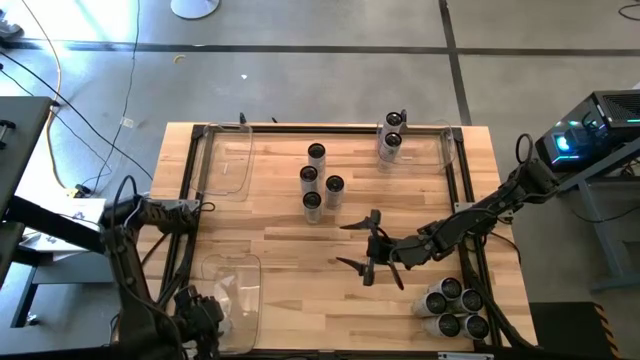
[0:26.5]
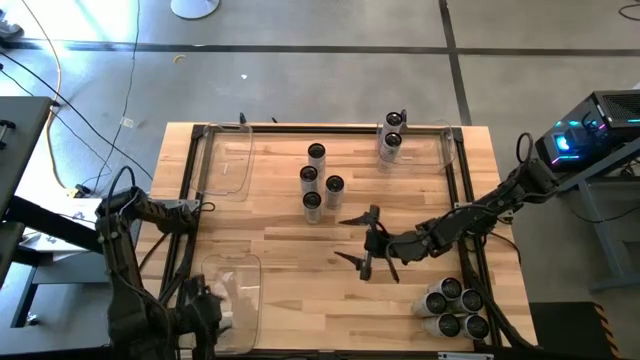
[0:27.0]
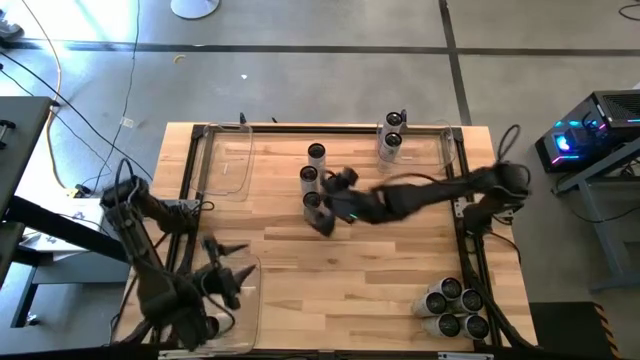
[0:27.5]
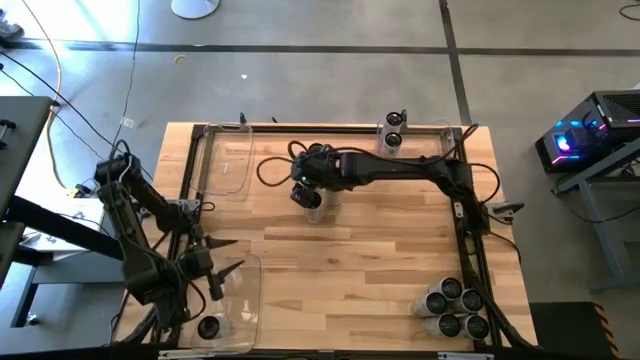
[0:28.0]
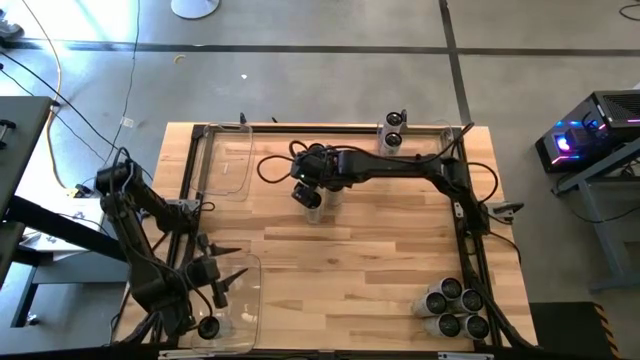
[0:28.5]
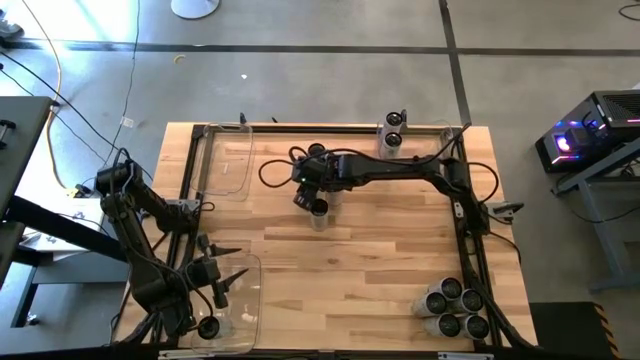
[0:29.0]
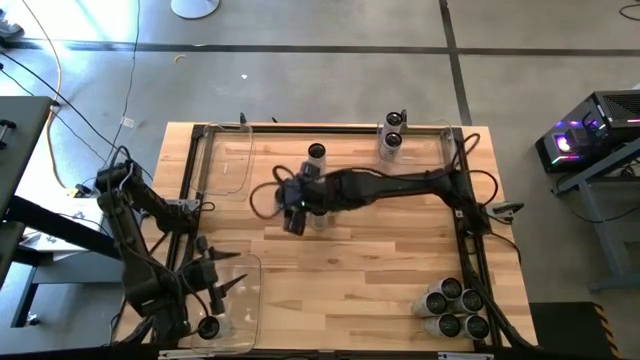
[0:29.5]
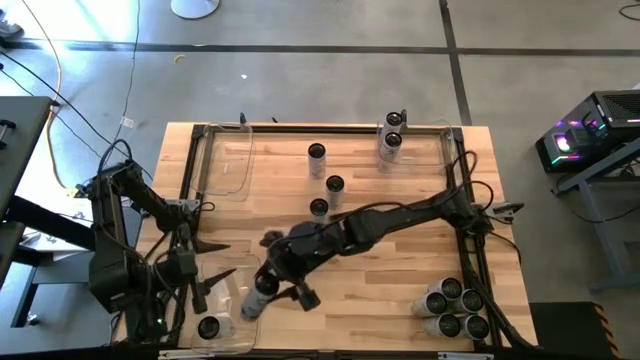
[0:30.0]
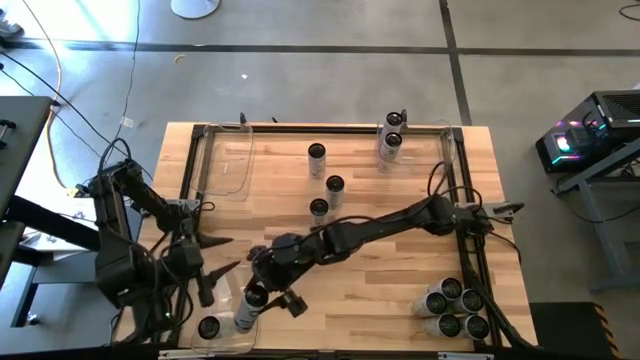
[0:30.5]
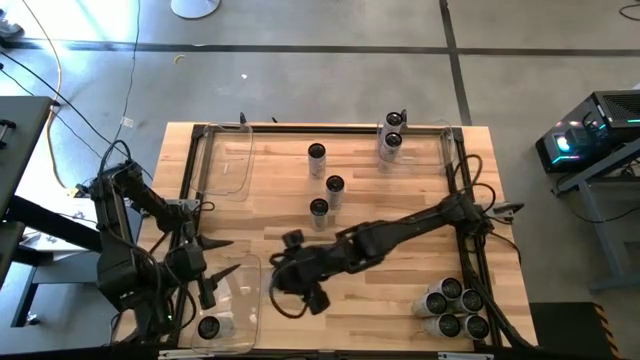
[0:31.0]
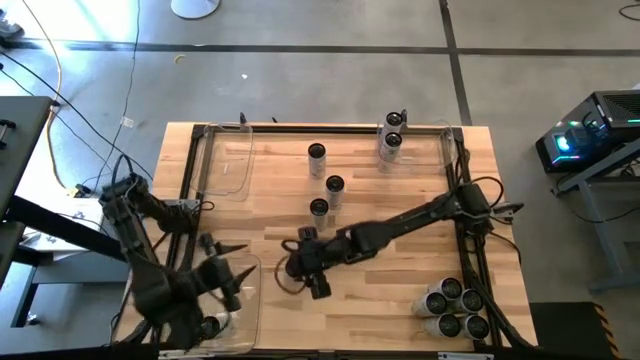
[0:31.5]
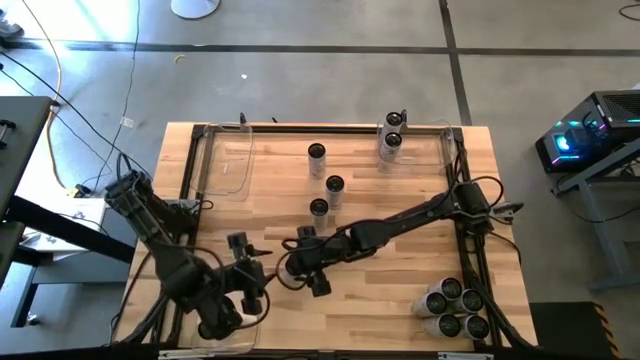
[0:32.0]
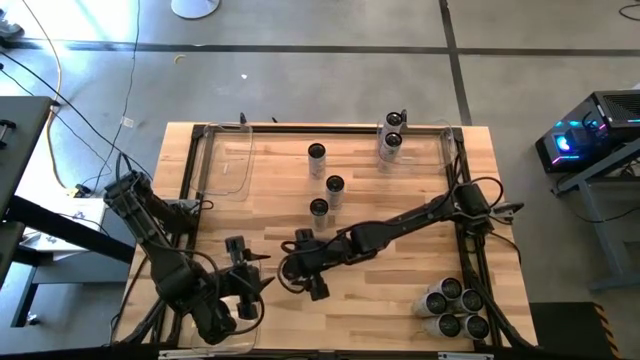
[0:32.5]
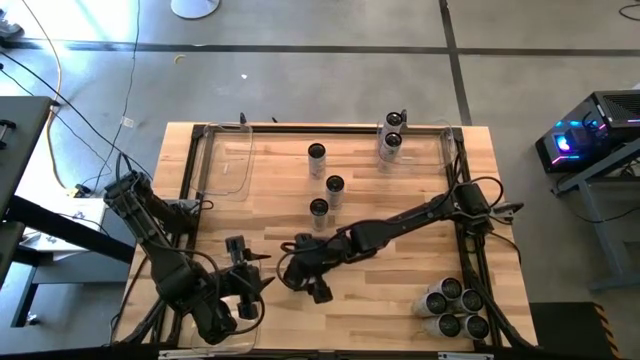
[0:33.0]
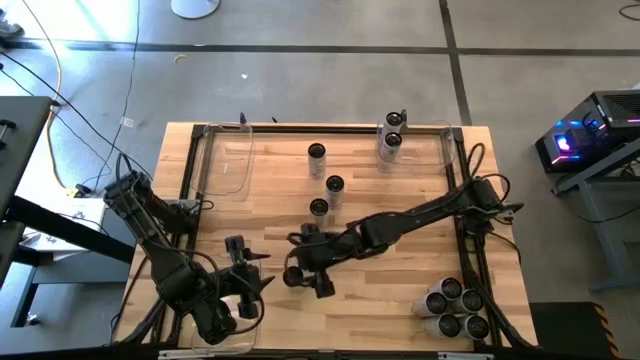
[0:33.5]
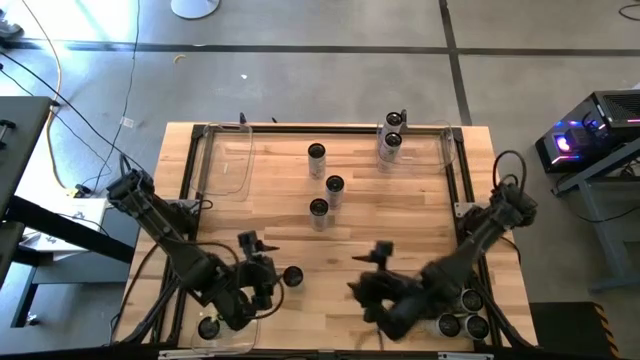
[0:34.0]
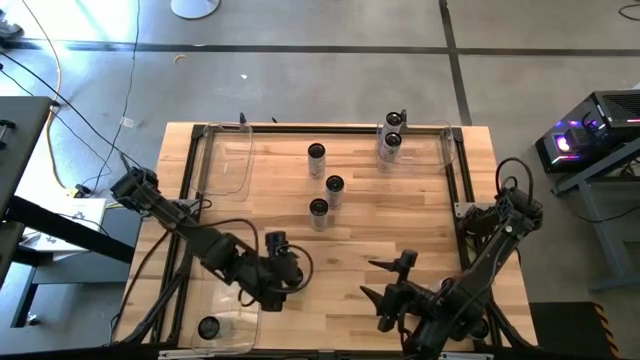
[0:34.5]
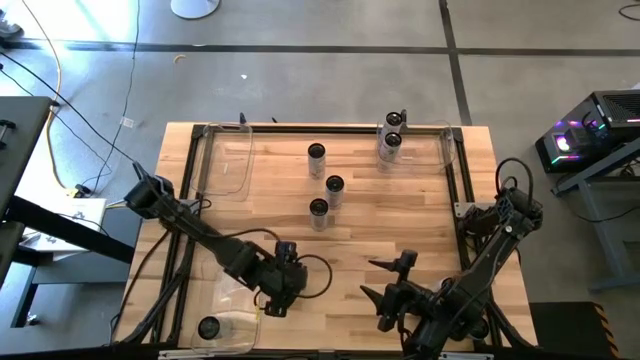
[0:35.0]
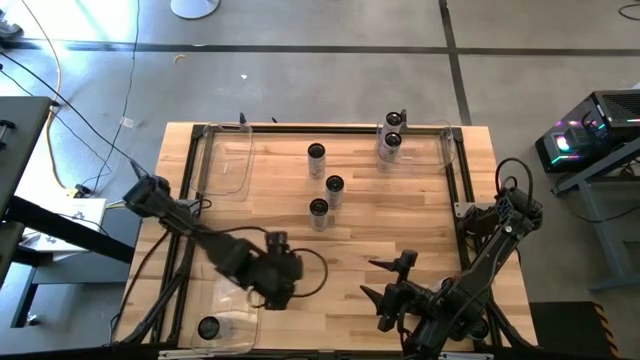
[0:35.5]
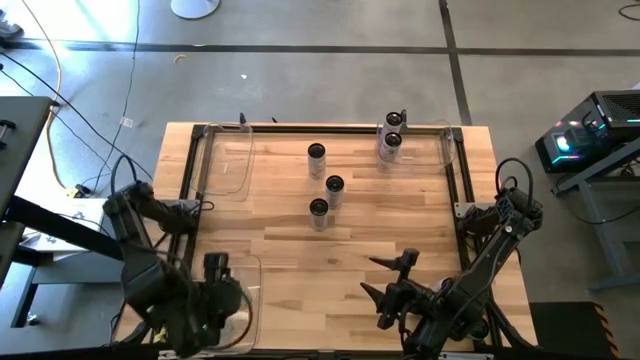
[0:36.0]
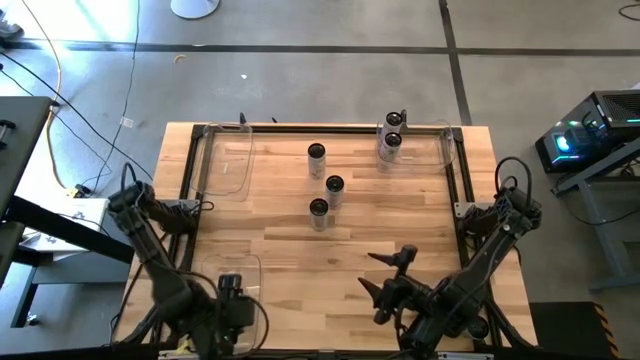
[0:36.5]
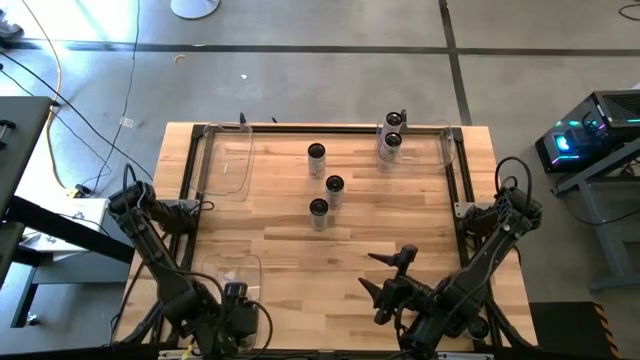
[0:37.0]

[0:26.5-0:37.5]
Task: Sort soda cans
Put the white blue soda can into the bottom transparent bin

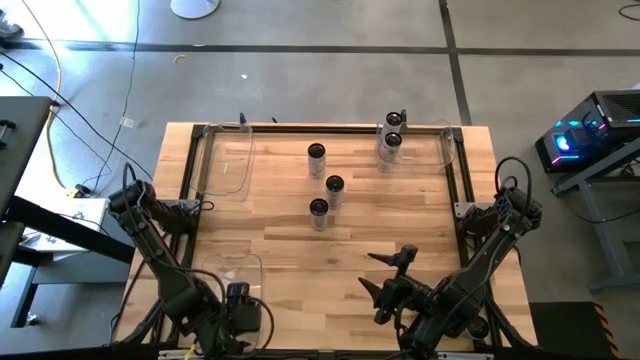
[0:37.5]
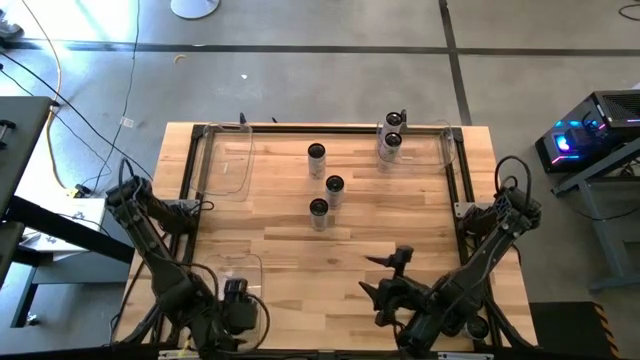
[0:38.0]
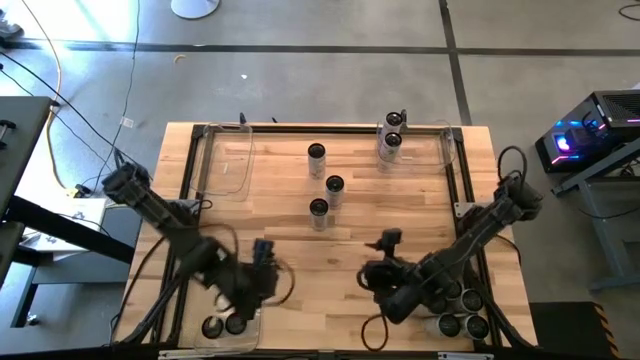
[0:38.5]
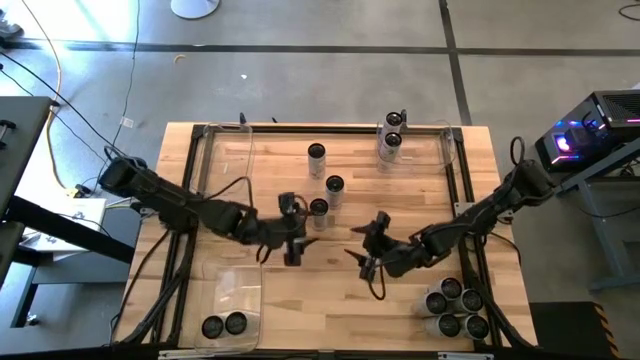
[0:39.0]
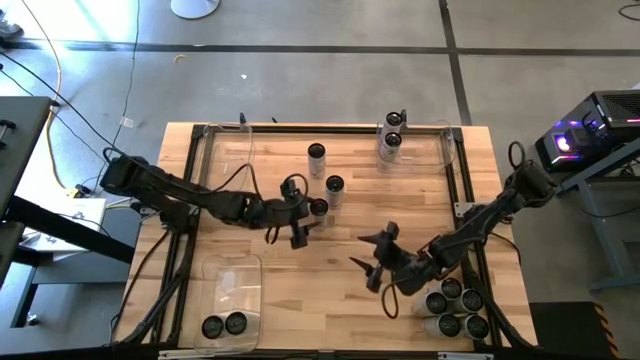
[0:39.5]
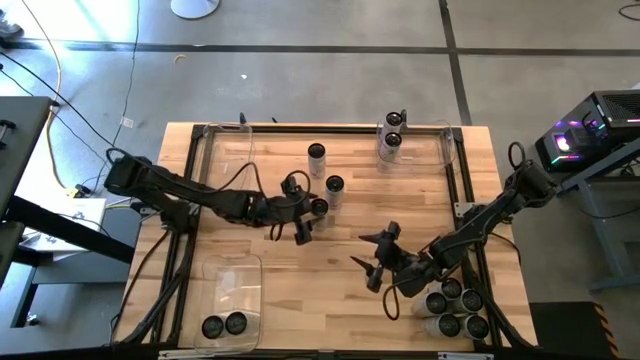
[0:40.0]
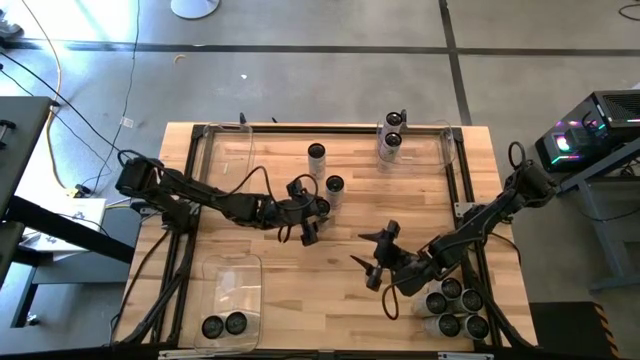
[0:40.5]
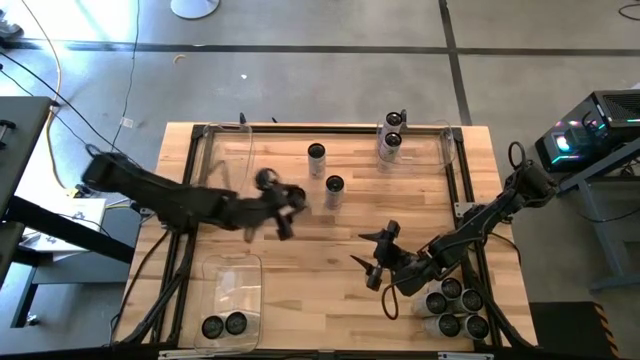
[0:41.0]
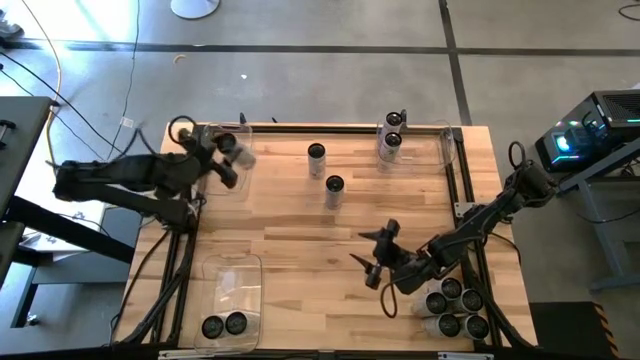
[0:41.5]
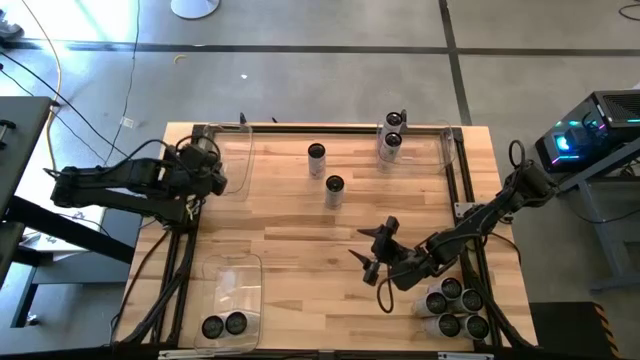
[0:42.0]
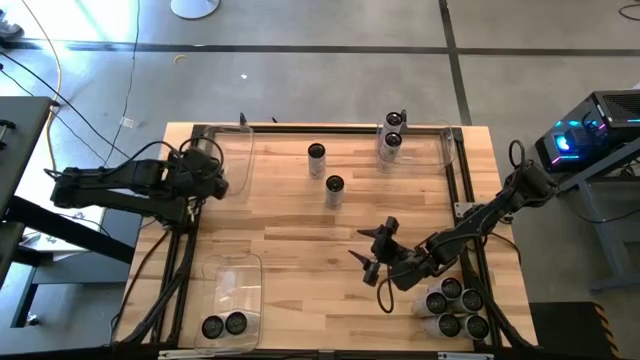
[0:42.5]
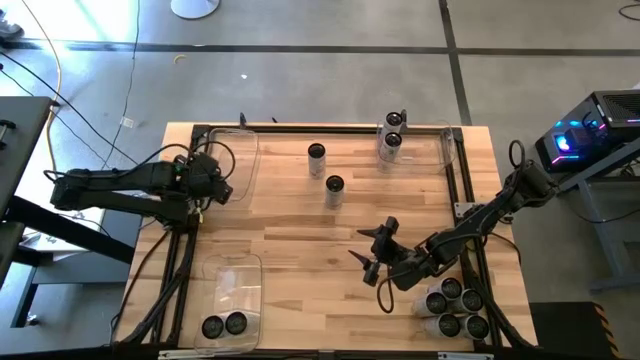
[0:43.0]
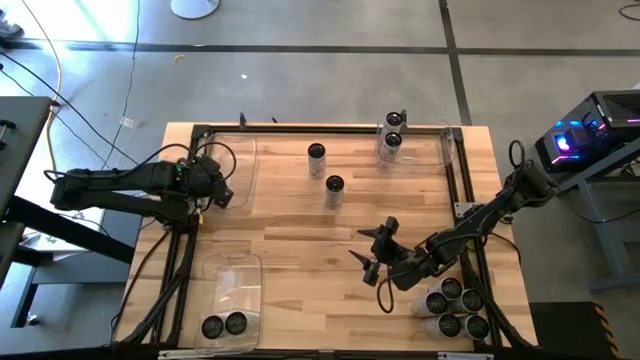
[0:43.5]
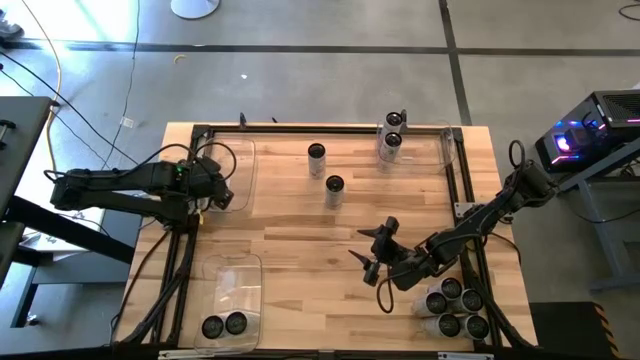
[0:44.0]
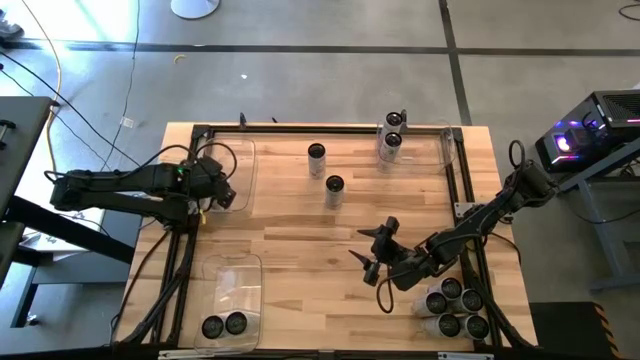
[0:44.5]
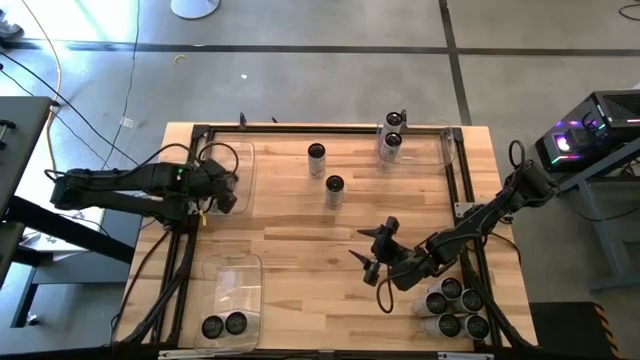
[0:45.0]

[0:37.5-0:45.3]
Put the white yellow soda can into the top left transparent bin

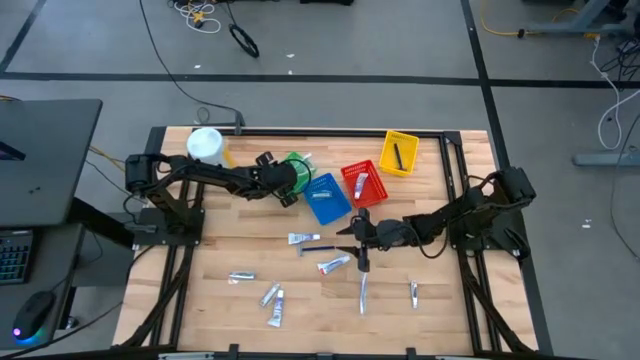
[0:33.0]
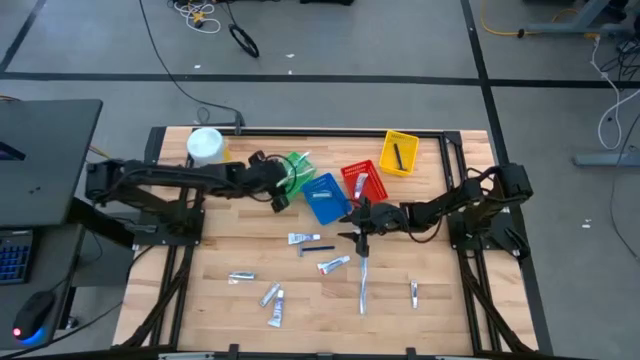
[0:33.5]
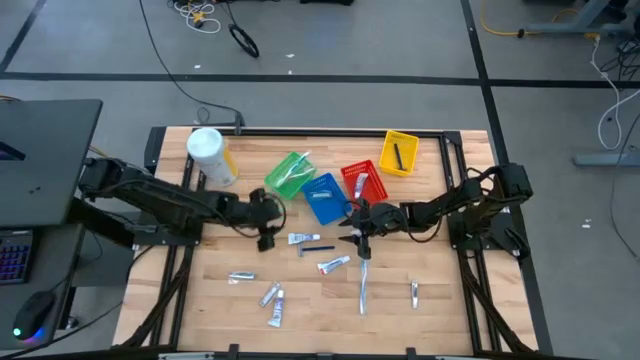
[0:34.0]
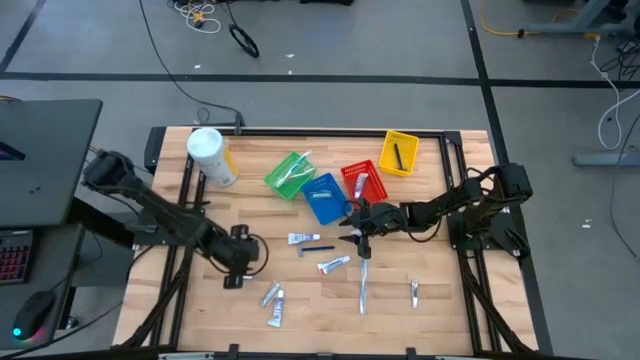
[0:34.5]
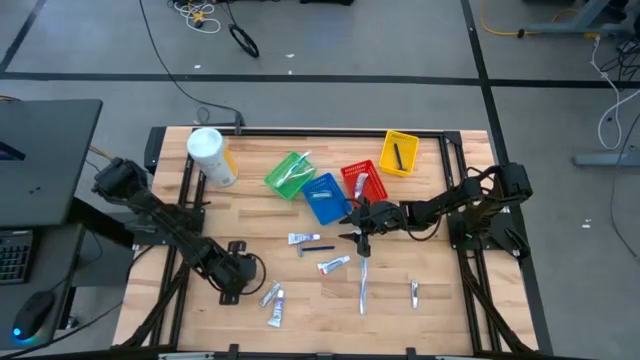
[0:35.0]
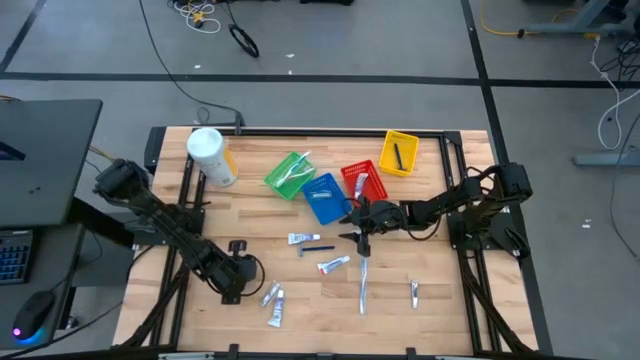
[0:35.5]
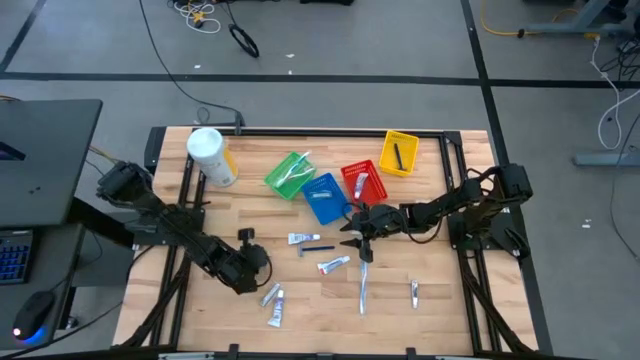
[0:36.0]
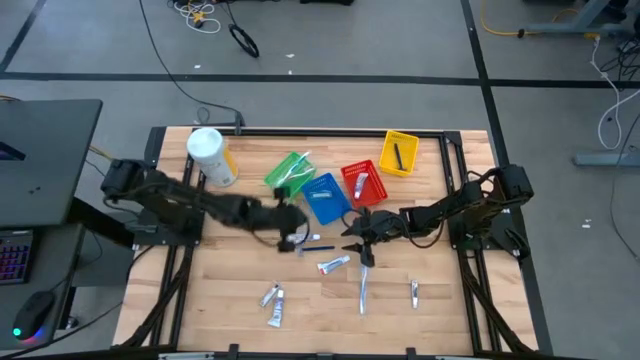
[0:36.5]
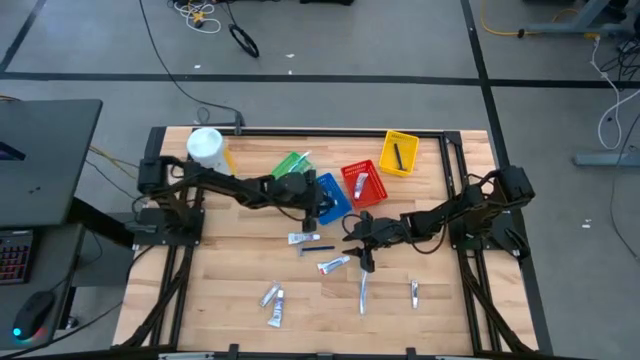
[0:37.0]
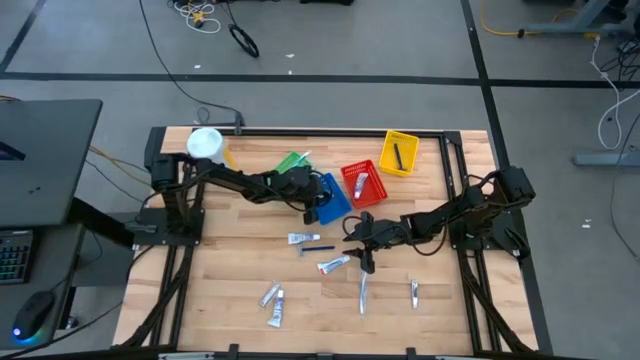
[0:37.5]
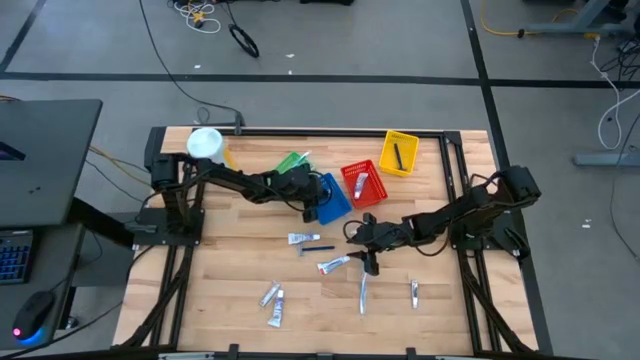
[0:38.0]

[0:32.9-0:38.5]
Task: Pick & Place Travel size toiletries
Put the left nail clipper into the blue bin
